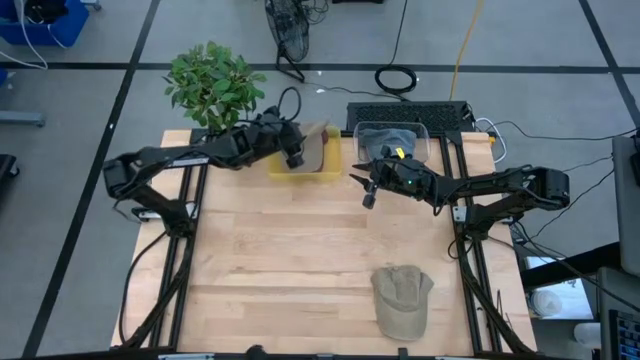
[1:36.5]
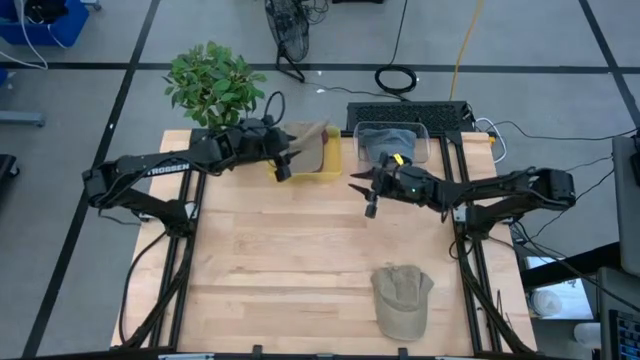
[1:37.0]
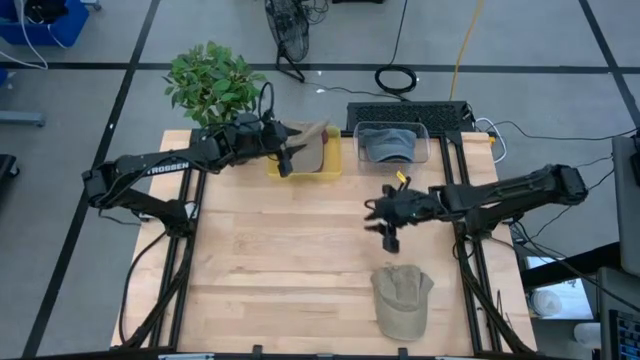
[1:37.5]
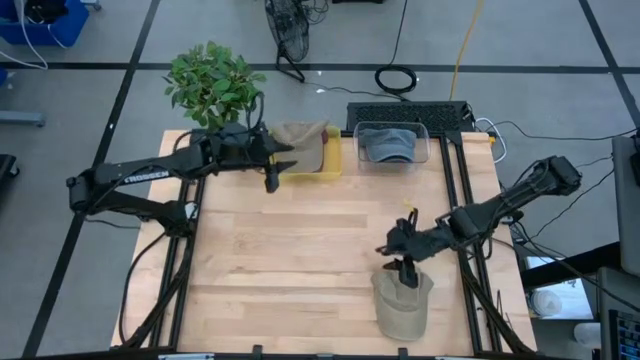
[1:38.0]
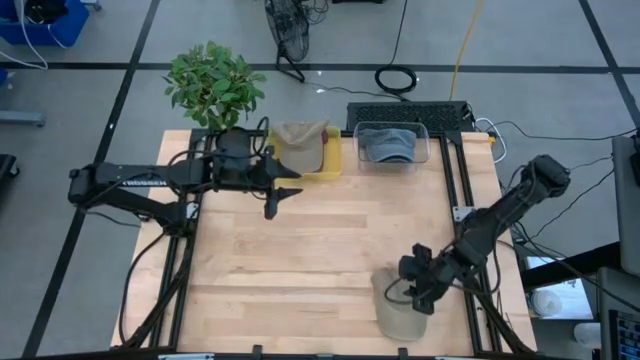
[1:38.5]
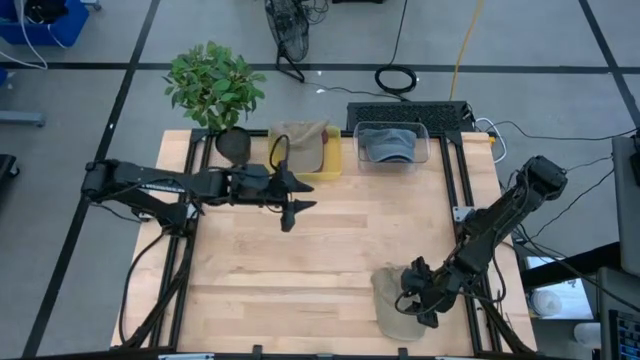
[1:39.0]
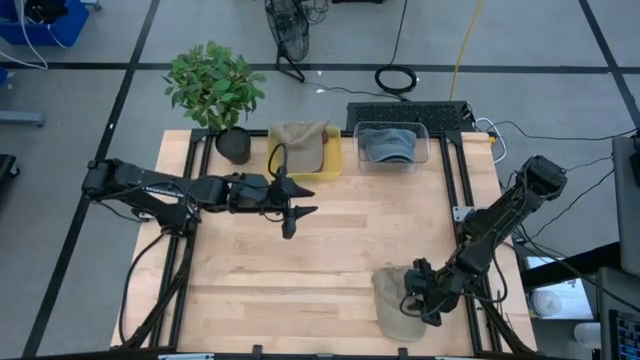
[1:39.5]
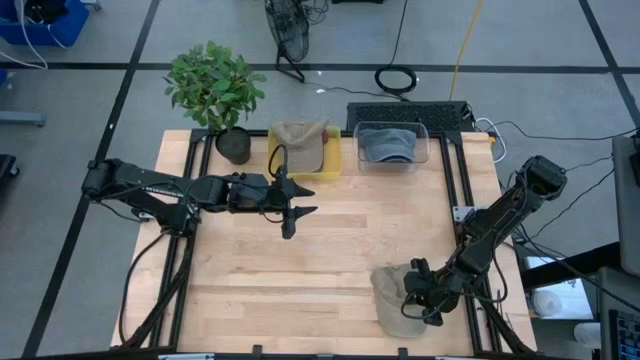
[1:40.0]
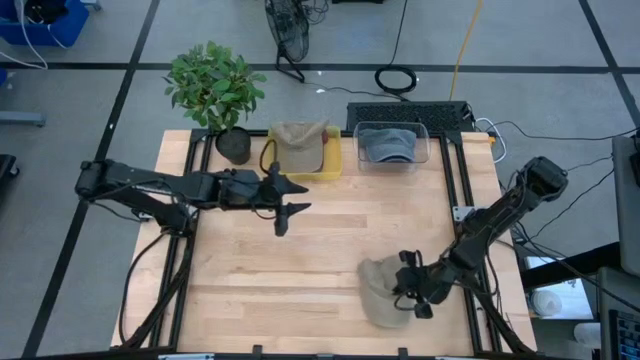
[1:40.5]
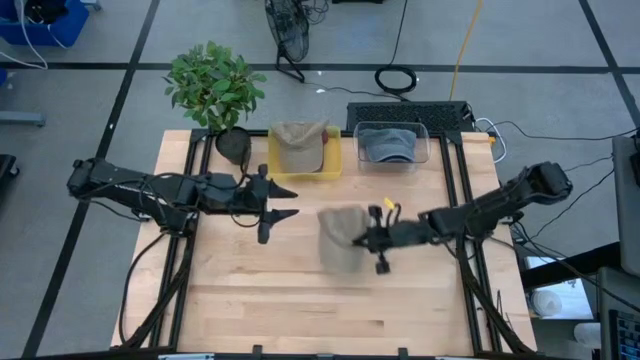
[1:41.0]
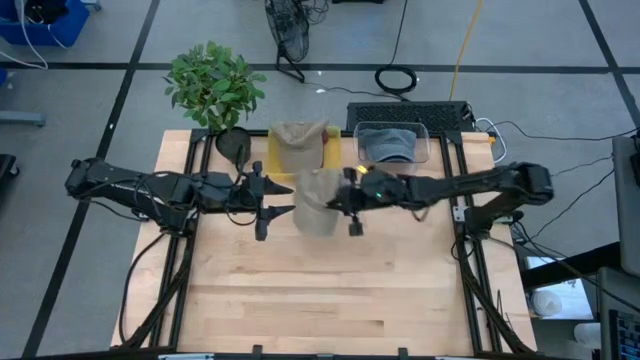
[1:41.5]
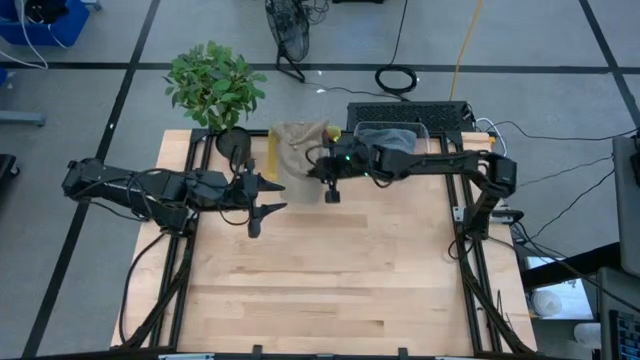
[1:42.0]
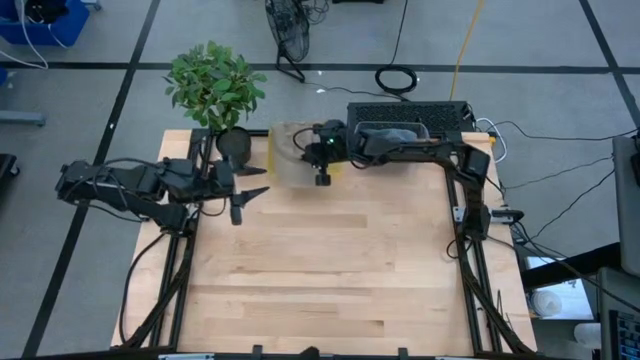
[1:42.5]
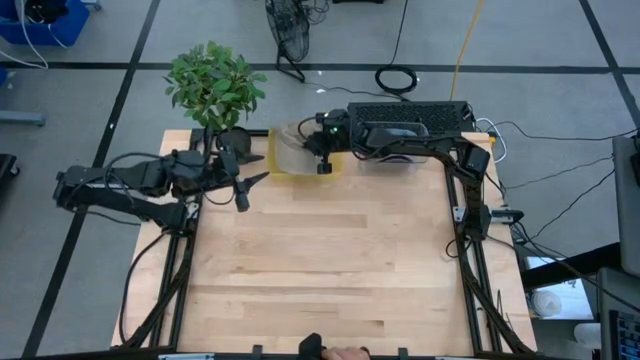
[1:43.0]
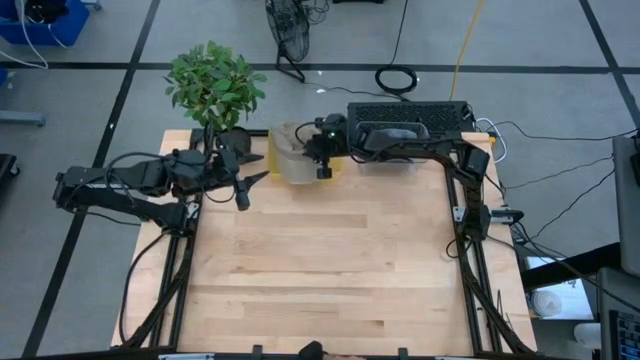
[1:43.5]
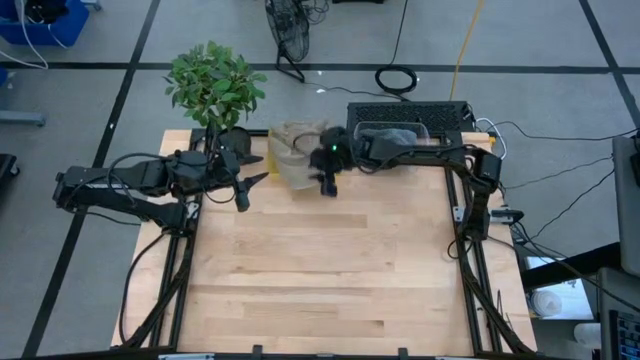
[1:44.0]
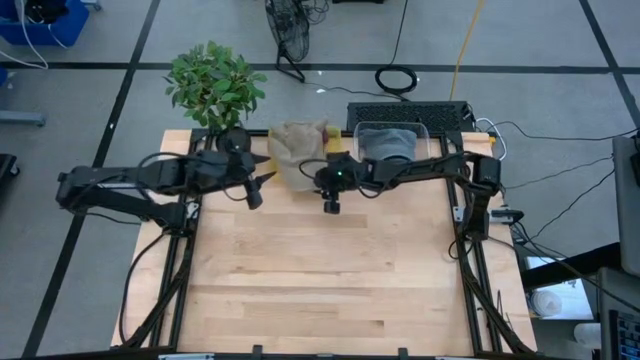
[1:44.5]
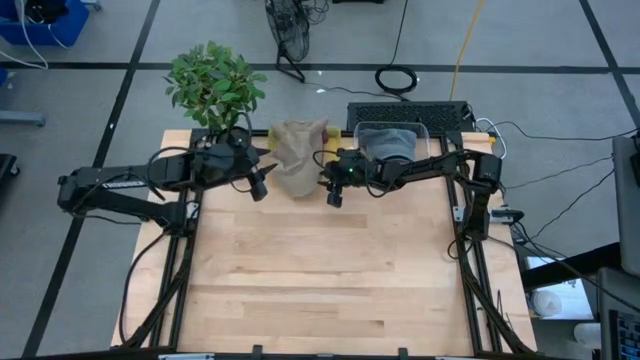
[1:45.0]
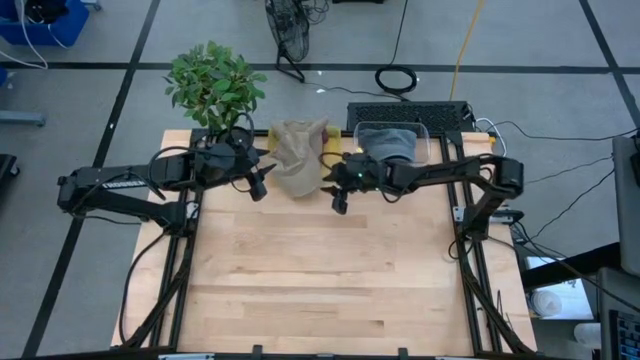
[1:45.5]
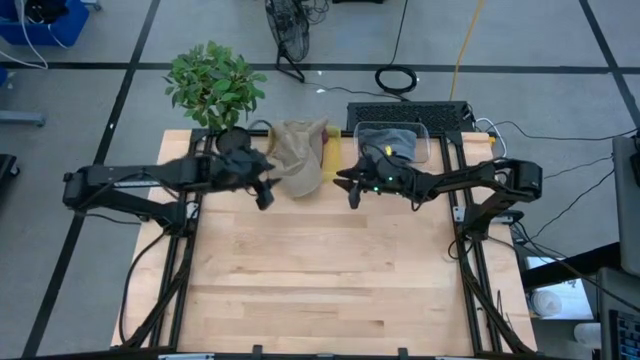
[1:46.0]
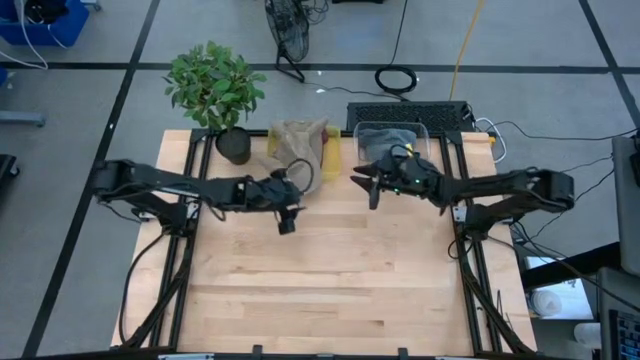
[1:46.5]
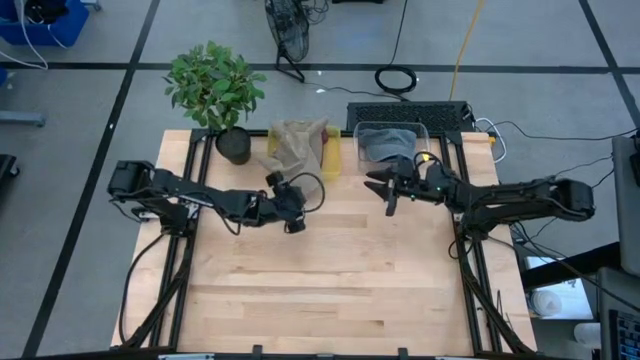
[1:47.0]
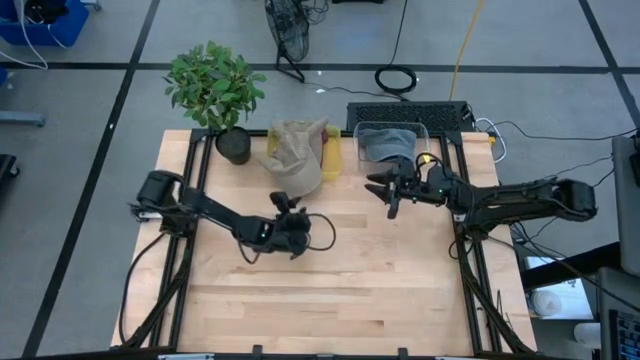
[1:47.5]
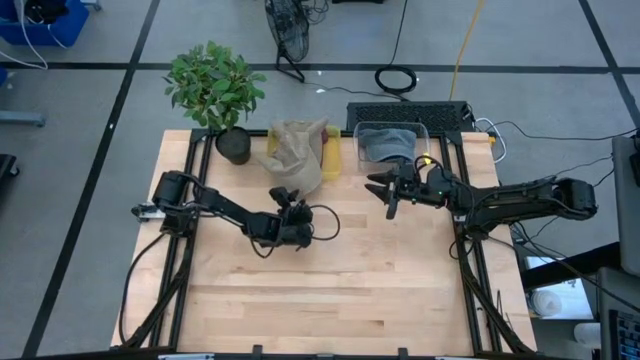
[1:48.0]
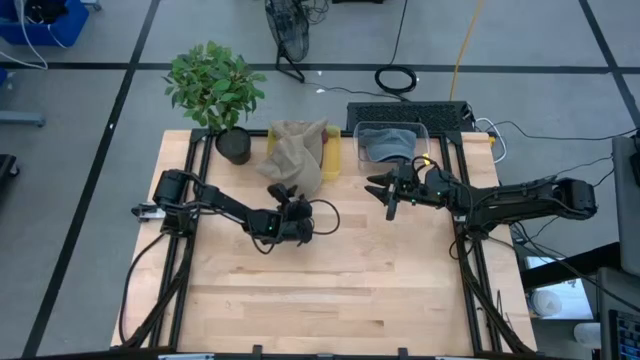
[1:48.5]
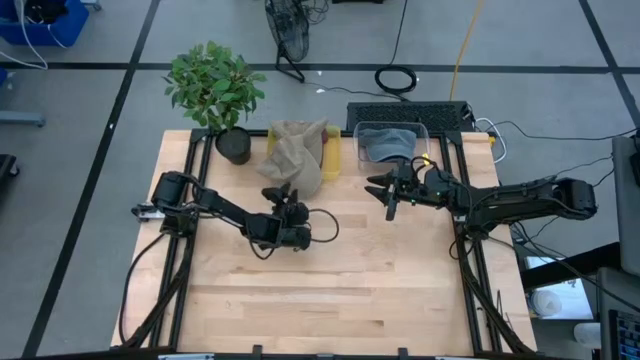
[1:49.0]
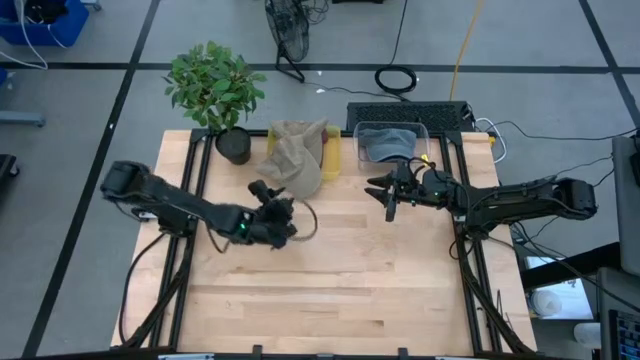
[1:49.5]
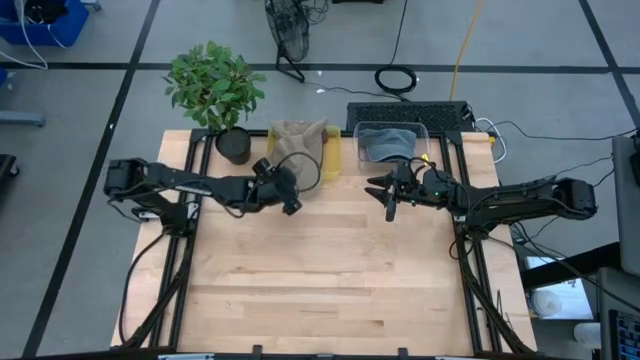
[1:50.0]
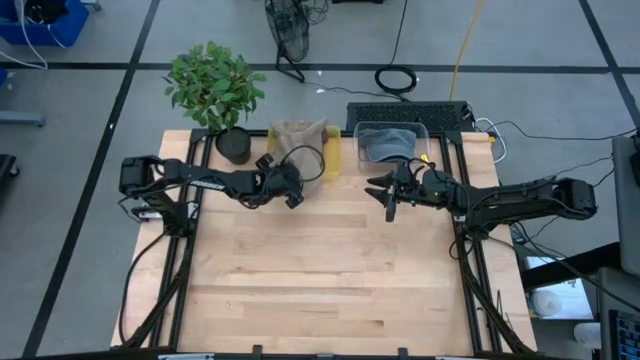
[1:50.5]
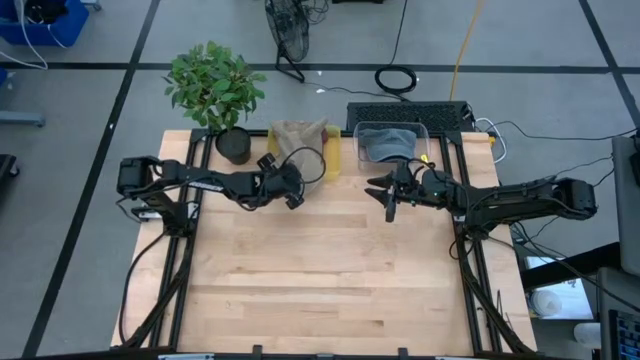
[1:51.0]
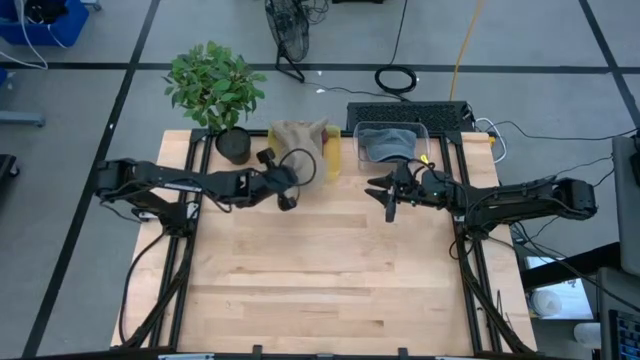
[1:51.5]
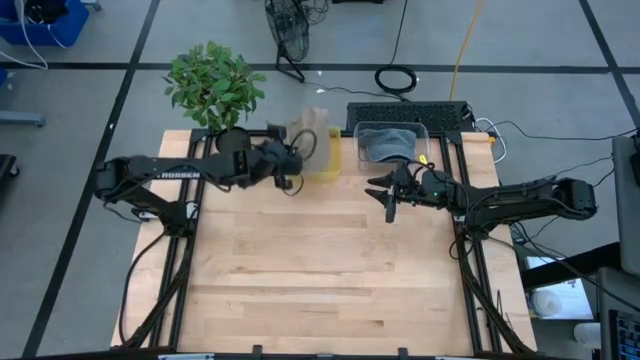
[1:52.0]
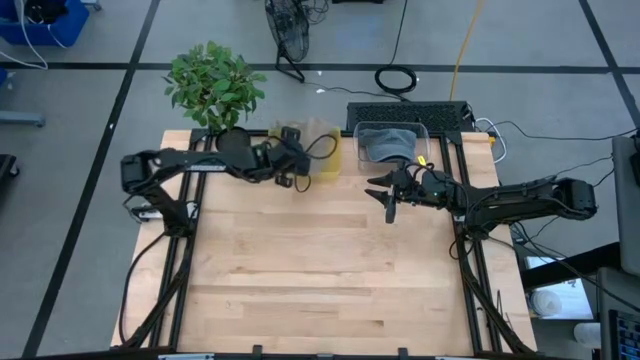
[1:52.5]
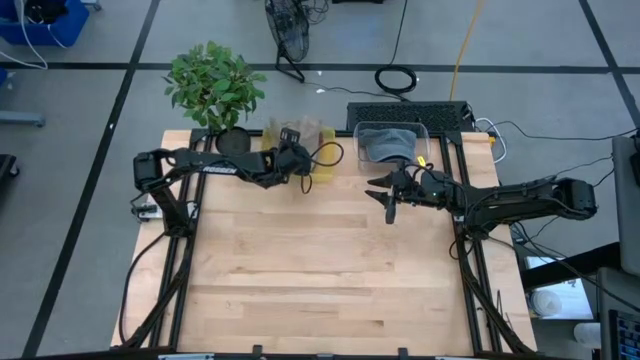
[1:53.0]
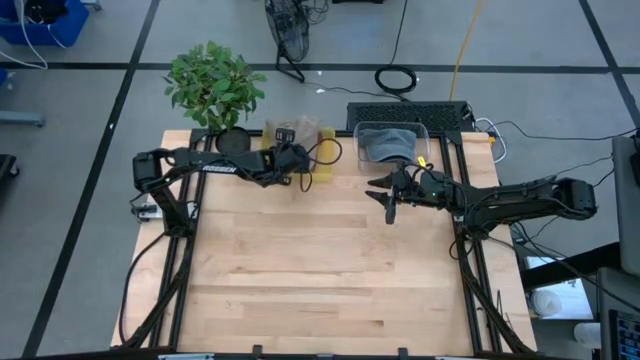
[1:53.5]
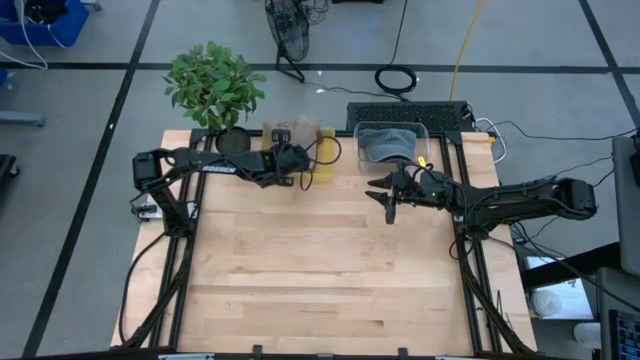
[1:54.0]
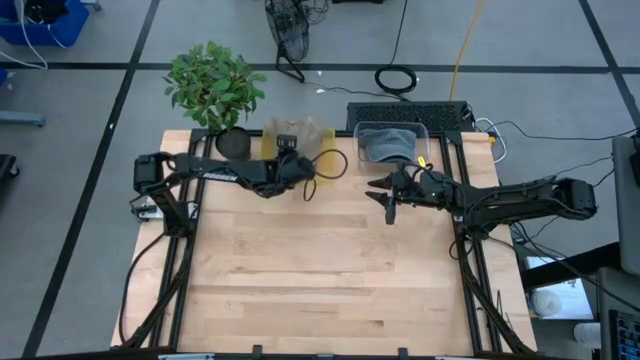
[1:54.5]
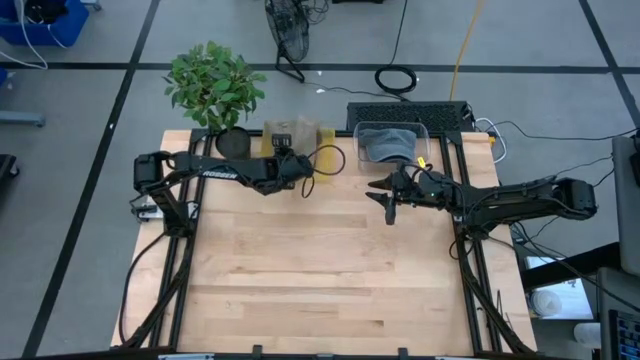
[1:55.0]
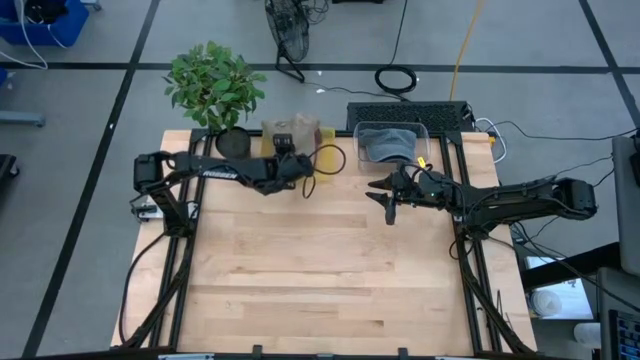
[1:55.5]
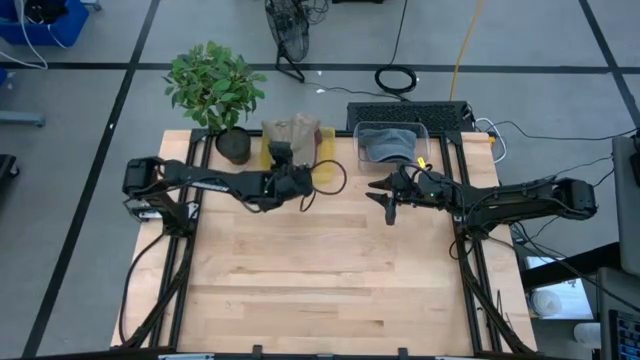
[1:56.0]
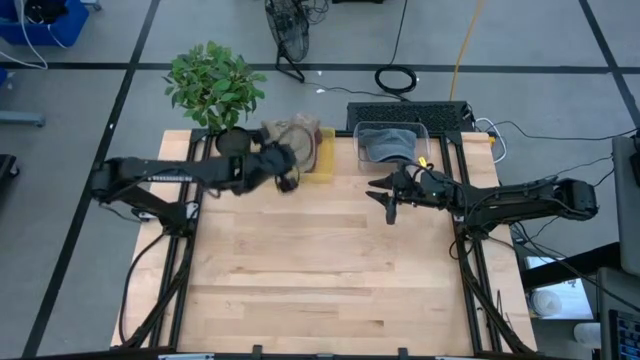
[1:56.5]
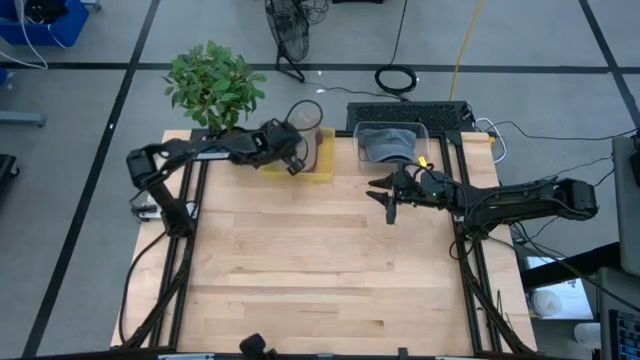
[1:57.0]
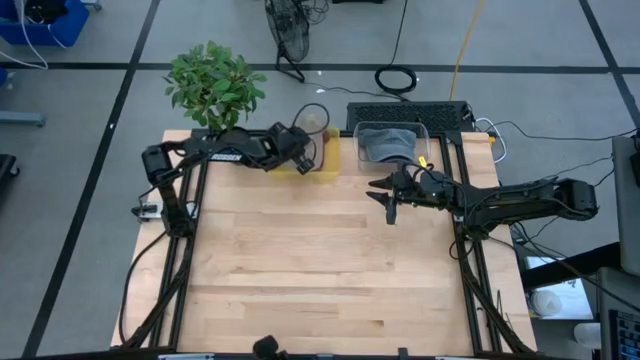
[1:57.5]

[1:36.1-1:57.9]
Task: Pick & Place hat
Put the brown cap into the yellow bin

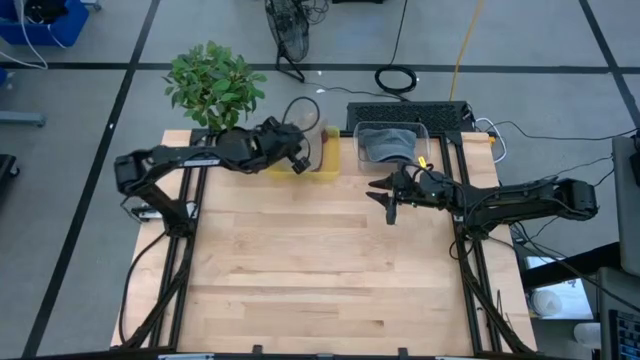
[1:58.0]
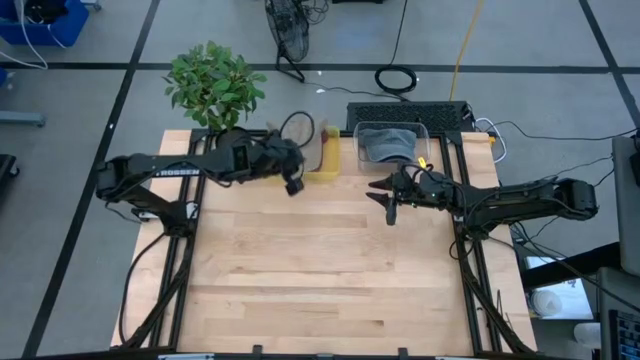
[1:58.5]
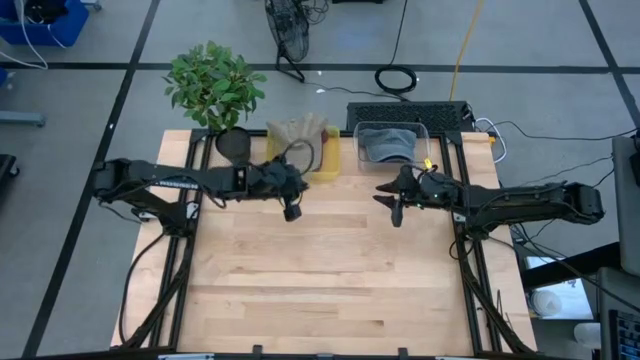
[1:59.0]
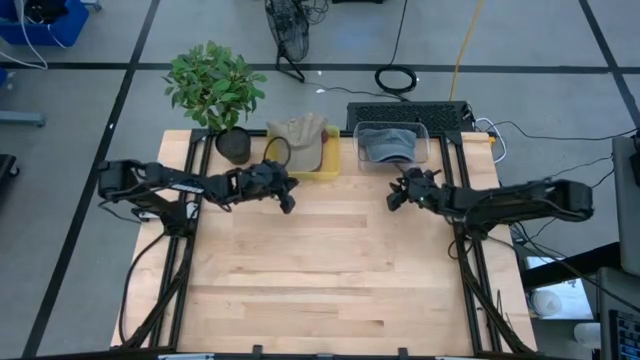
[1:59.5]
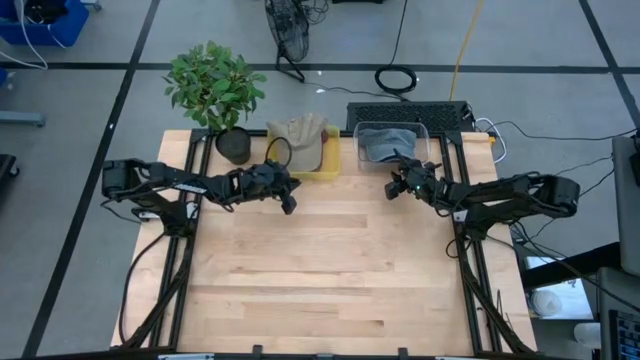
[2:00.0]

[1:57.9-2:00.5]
Adjust the transparent bin on the table
